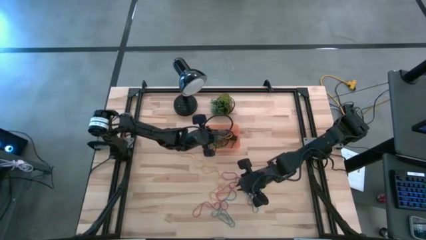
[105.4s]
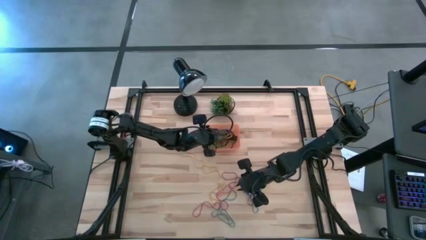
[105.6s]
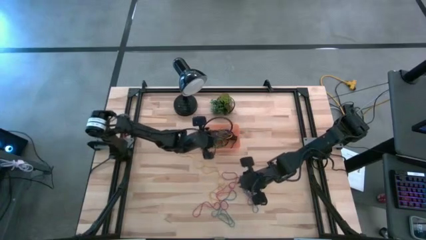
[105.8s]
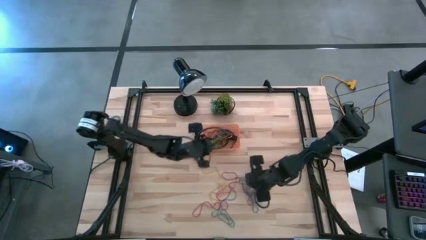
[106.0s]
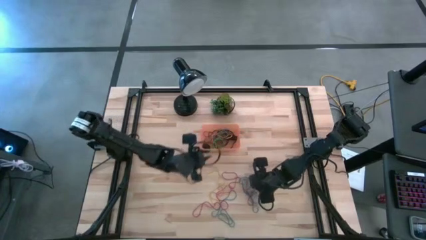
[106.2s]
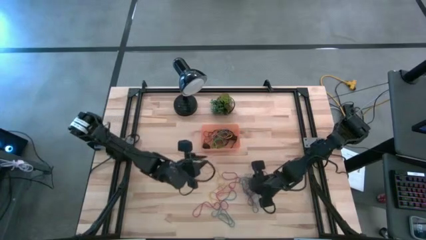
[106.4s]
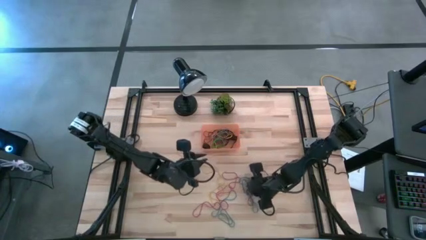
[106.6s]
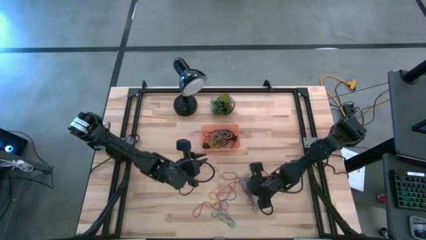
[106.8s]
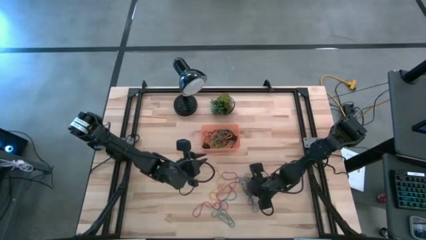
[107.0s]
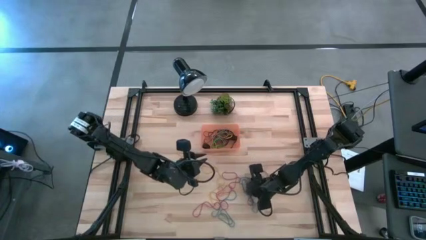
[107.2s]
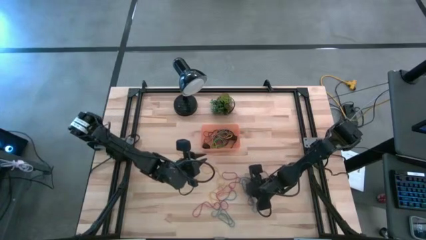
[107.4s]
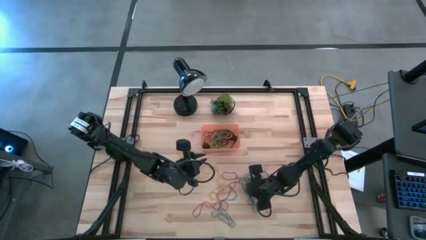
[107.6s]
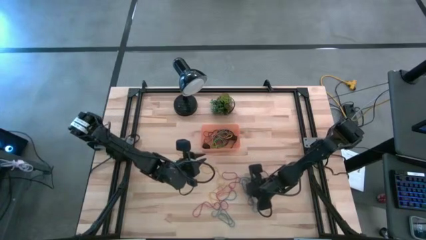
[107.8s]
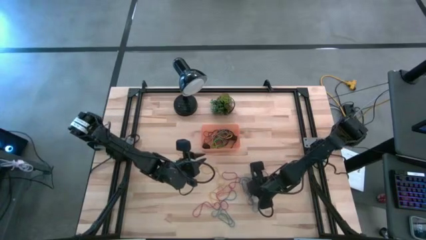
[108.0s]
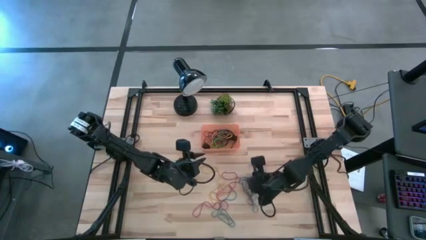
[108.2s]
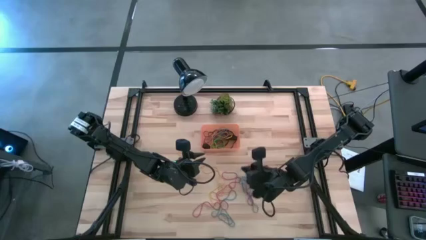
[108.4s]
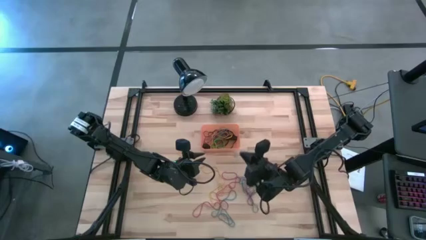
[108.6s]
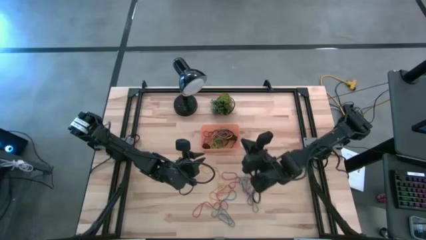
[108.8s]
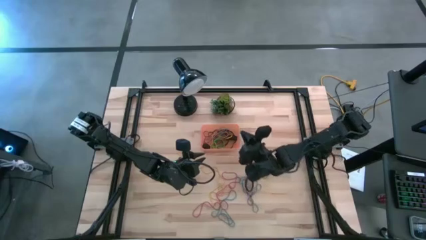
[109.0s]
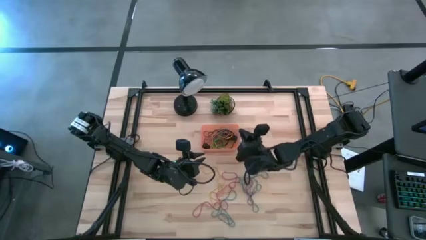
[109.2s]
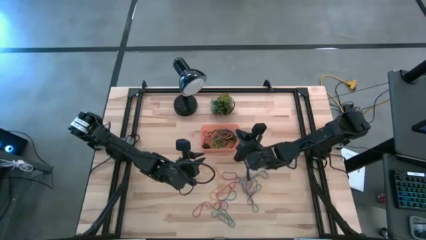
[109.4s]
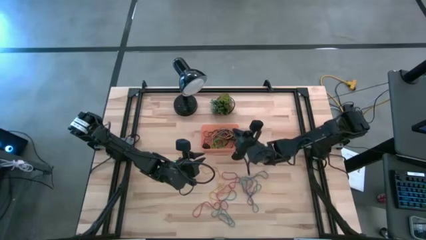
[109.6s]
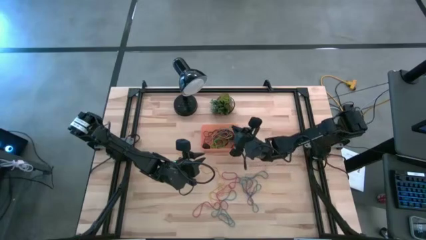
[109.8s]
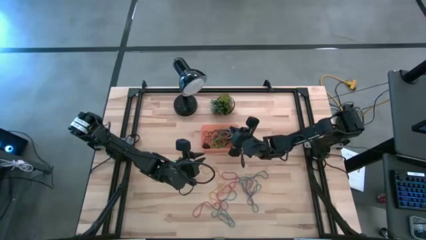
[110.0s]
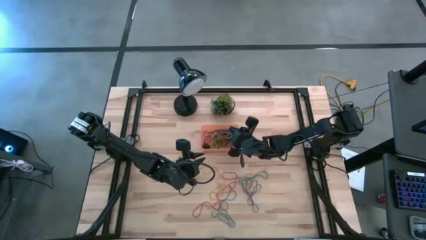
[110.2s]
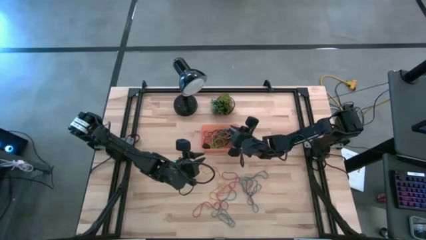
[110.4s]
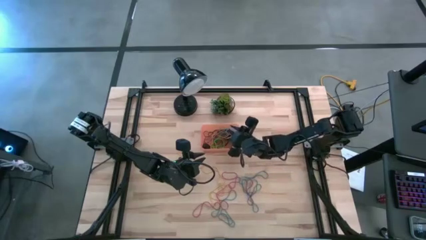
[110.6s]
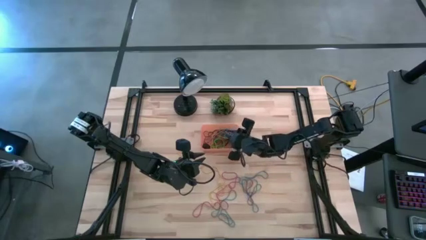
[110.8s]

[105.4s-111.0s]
Task: Pick and place rubber bands into bin
Put the blue rubber band into the orange bin

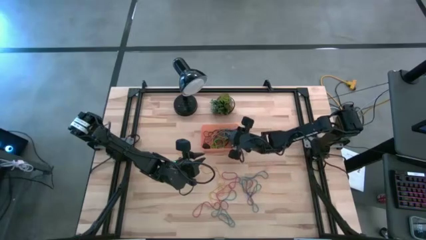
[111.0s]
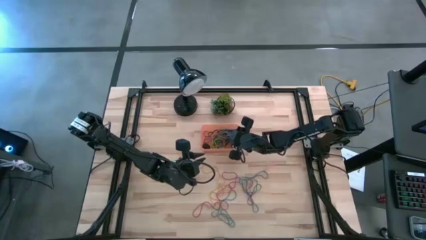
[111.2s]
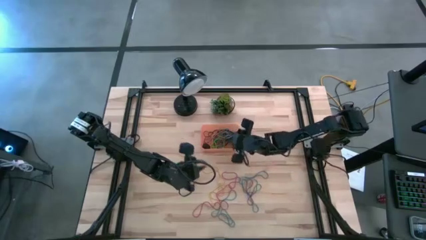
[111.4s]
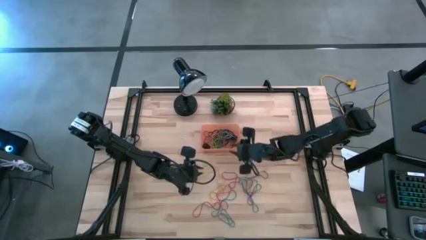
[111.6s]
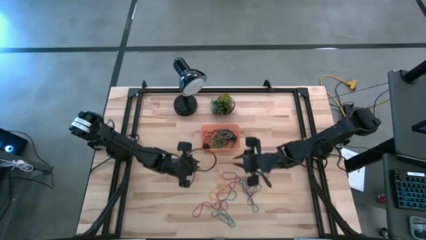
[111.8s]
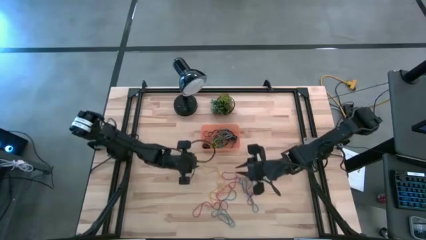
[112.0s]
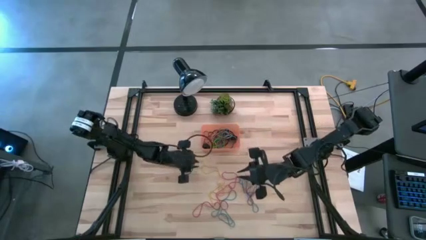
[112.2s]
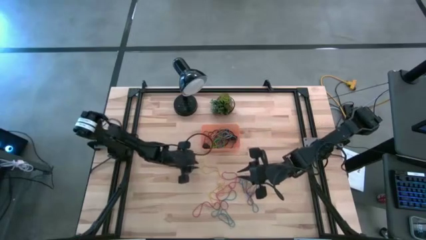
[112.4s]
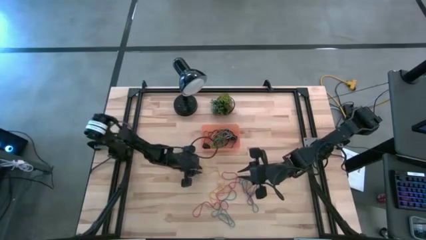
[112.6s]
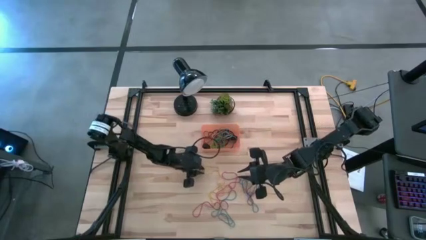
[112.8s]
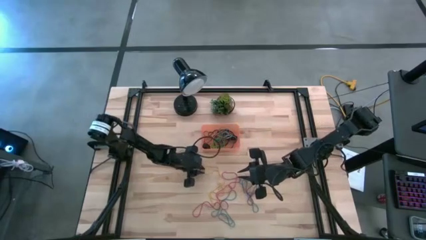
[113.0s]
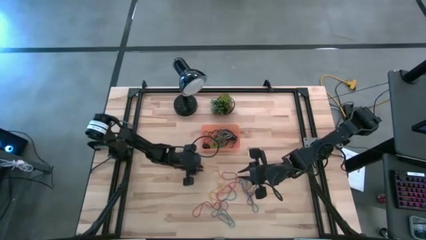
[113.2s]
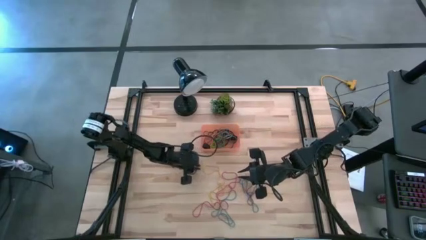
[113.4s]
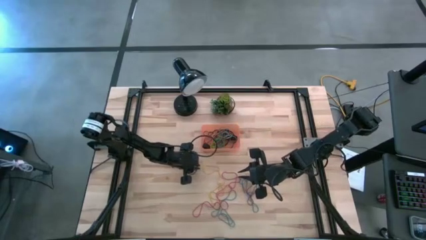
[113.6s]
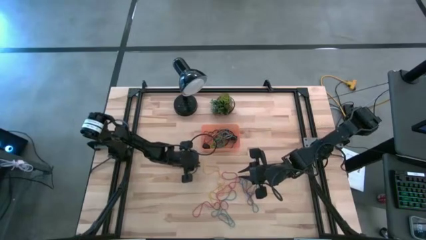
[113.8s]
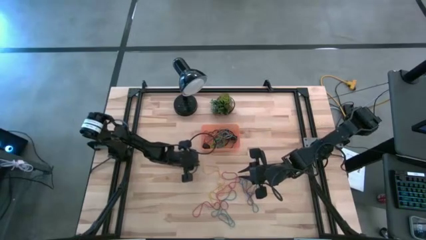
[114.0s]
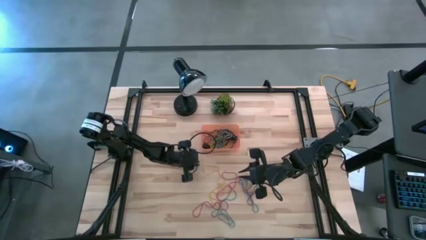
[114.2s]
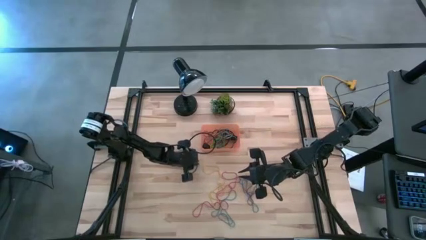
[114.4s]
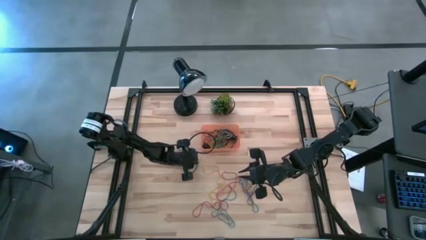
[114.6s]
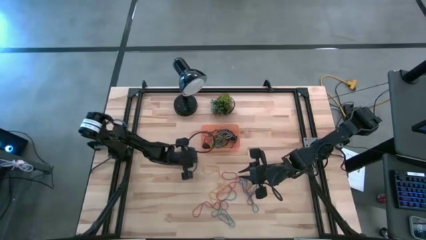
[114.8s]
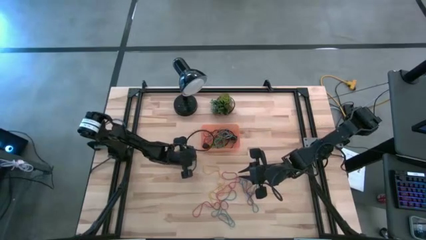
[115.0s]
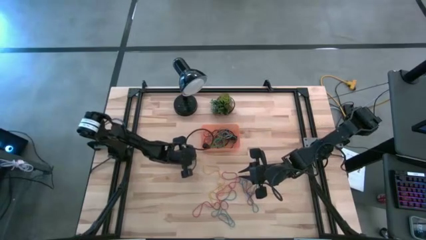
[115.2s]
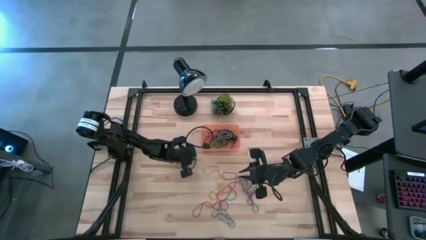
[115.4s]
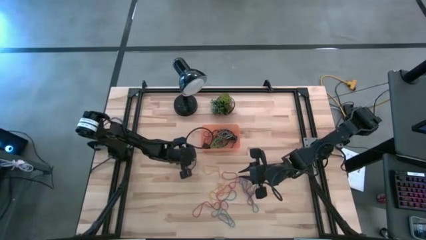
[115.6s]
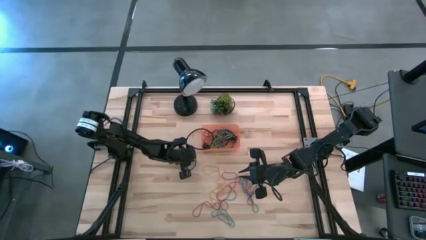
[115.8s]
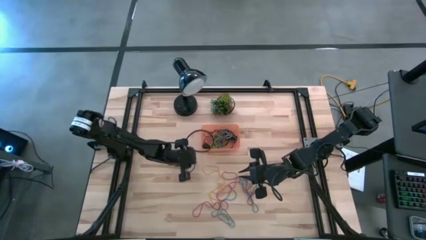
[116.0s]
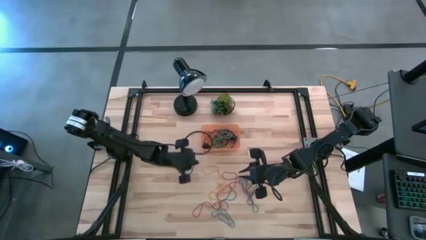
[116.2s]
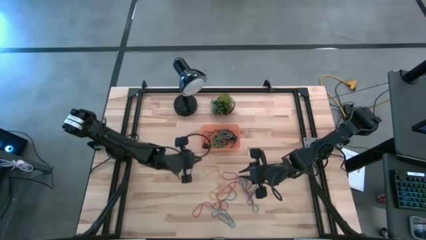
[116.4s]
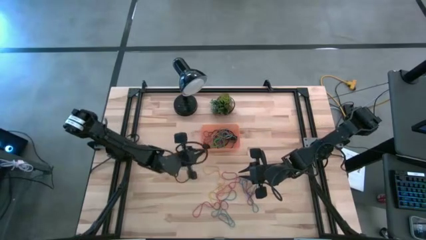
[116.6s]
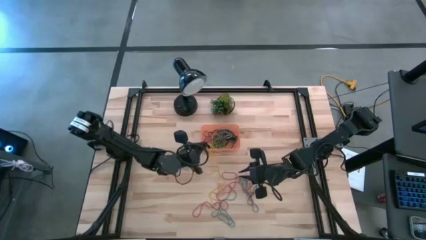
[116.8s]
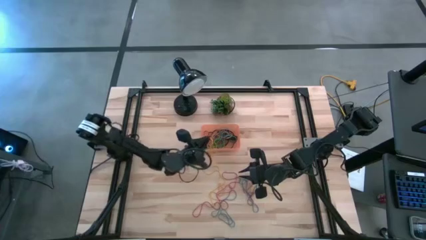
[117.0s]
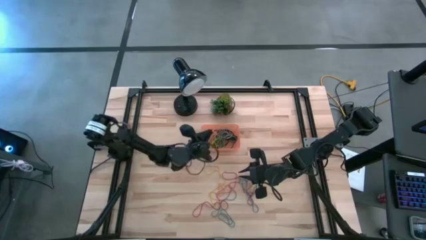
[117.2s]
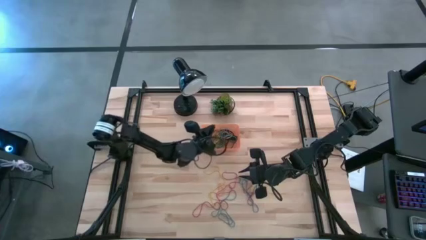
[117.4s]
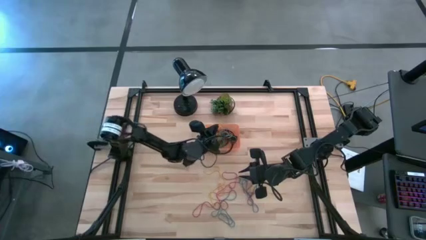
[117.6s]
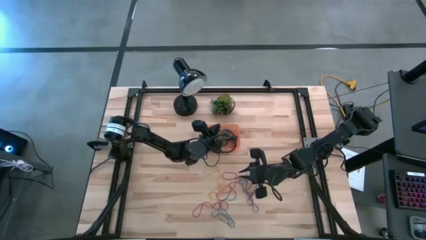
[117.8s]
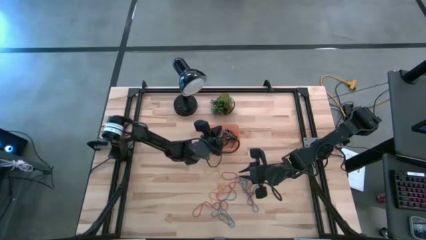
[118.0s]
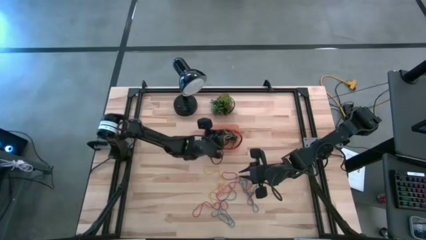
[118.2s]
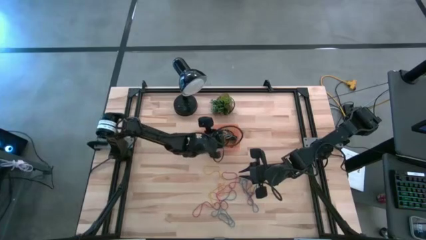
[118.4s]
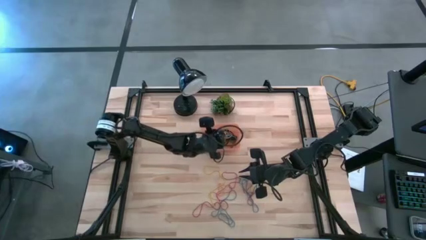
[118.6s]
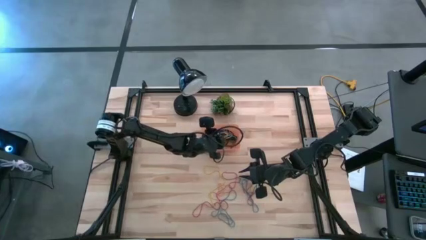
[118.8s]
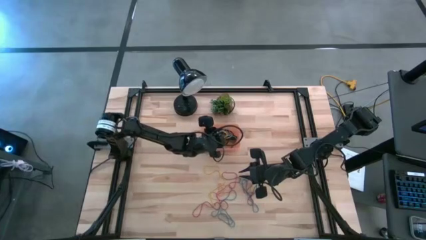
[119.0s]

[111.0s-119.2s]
Put the yellow rubber band into the orange bin

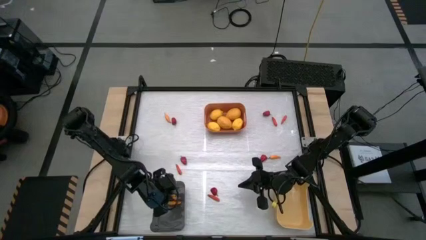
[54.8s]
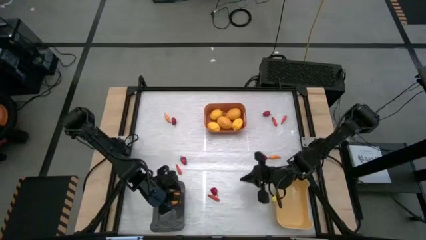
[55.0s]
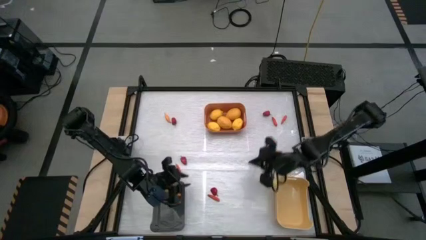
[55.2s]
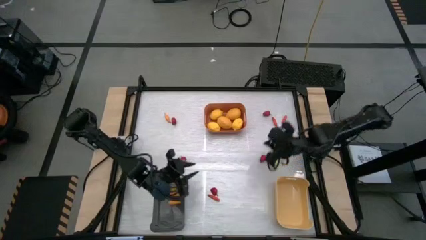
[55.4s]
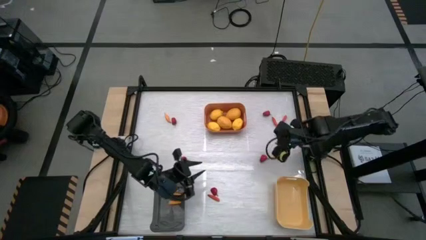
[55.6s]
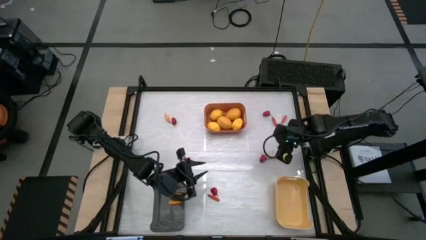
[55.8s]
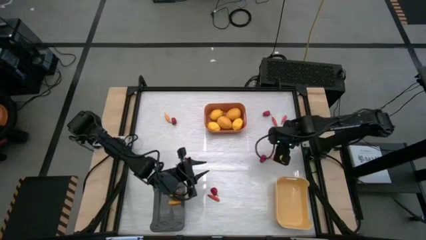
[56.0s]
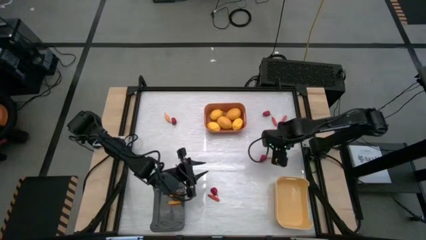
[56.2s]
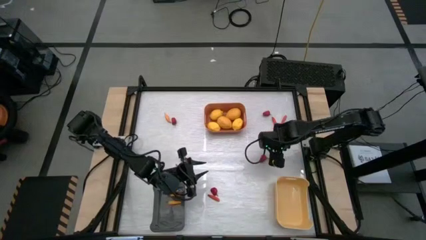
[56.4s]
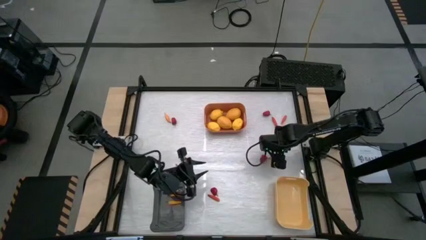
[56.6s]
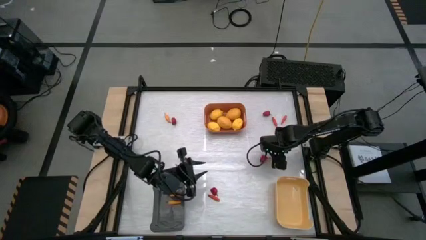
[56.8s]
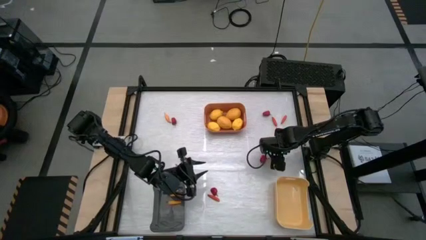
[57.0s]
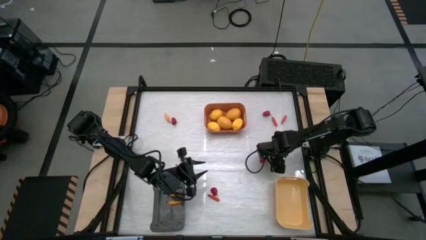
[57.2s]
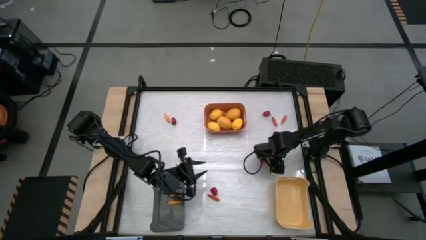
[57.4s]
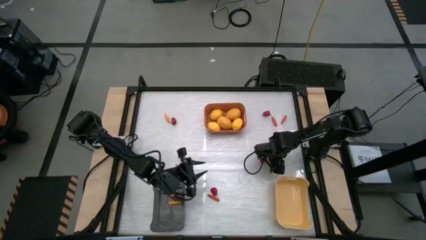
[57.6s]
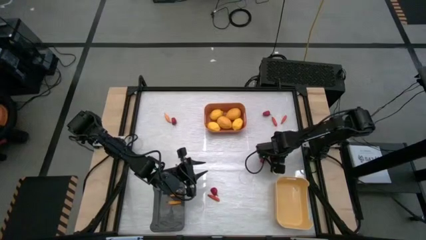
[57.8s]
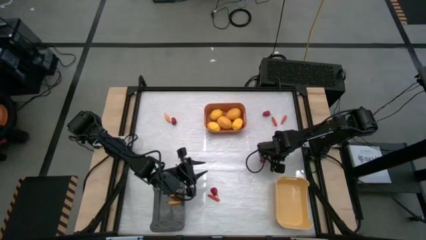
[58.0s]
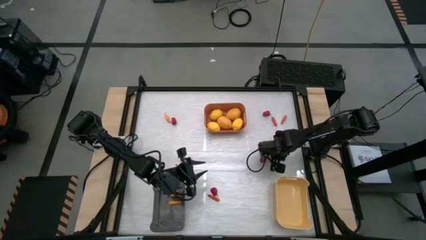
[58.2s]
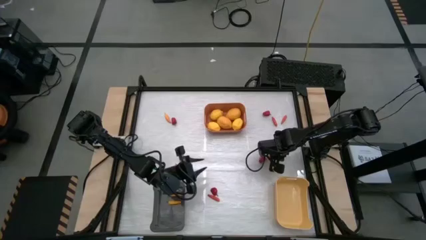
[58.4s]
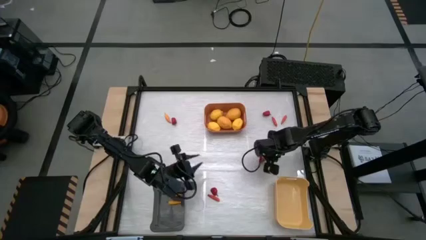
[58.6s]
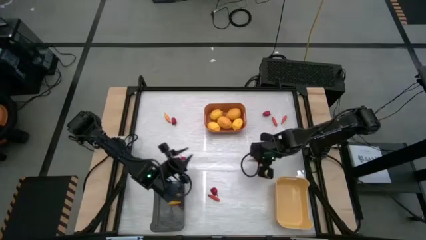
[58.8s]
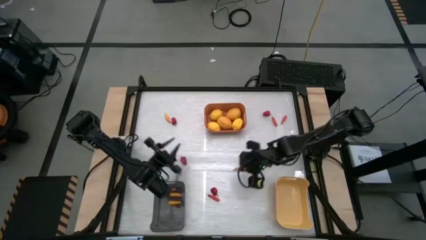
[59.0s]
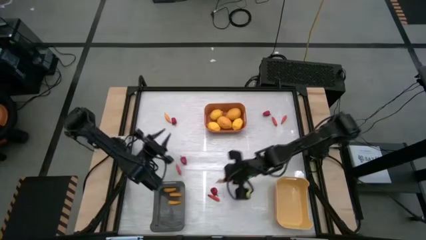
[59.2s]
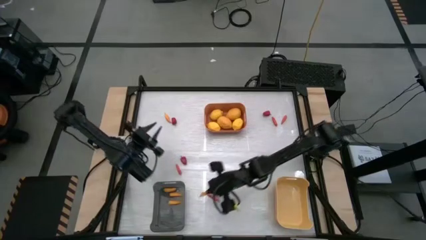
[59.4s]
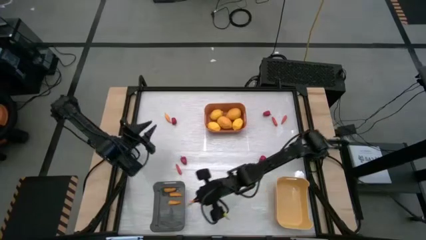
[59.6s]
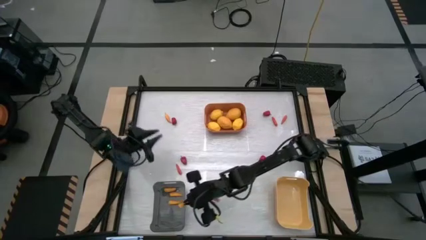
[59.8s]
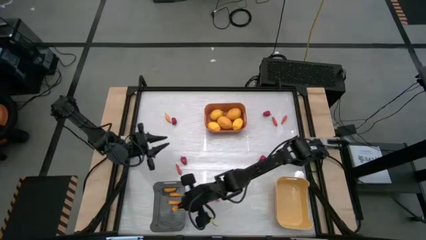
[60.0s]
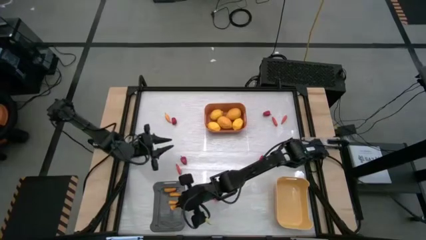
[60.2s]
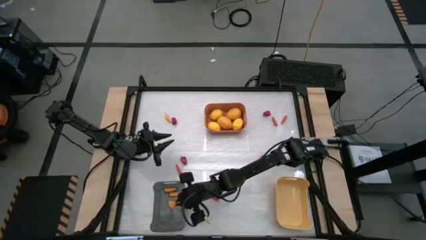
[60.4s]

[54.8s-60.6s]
Task: Sort produce into baskets
Put the yellow chili pepper into the black bin
